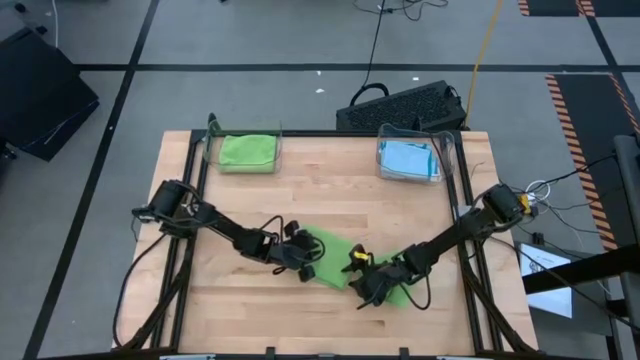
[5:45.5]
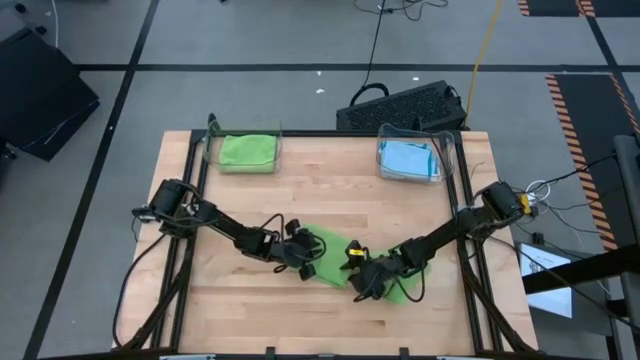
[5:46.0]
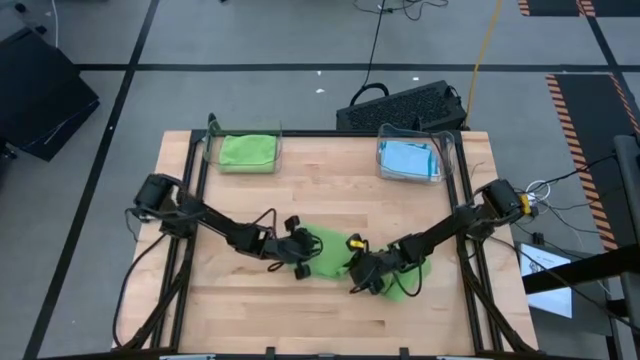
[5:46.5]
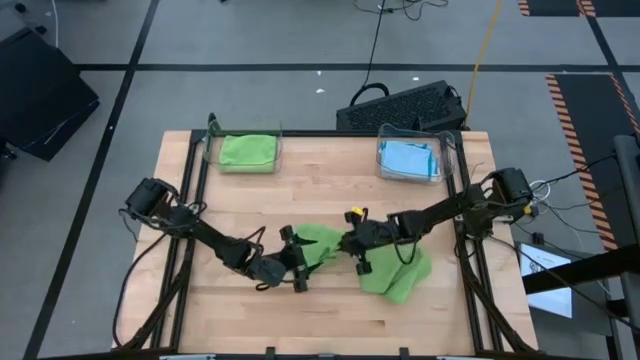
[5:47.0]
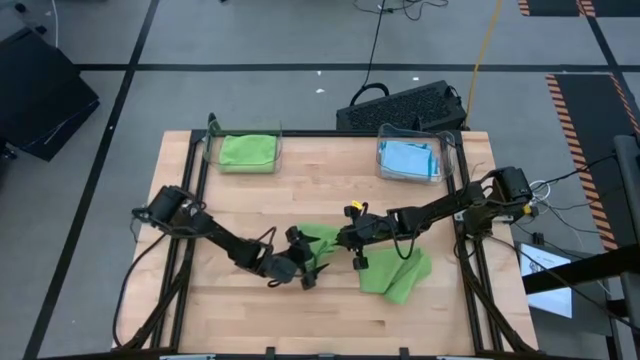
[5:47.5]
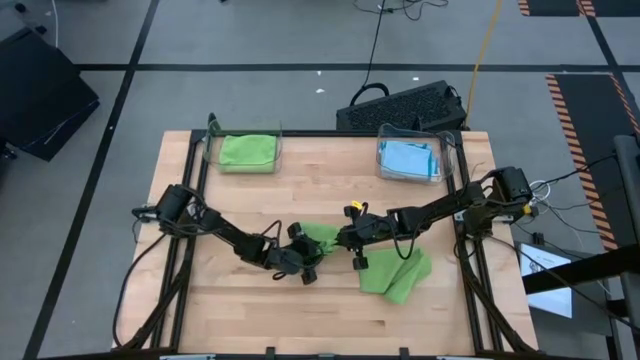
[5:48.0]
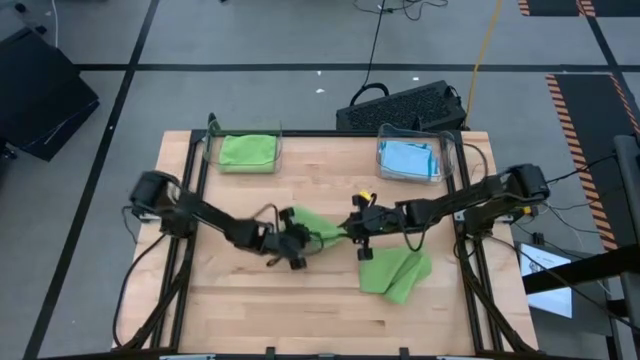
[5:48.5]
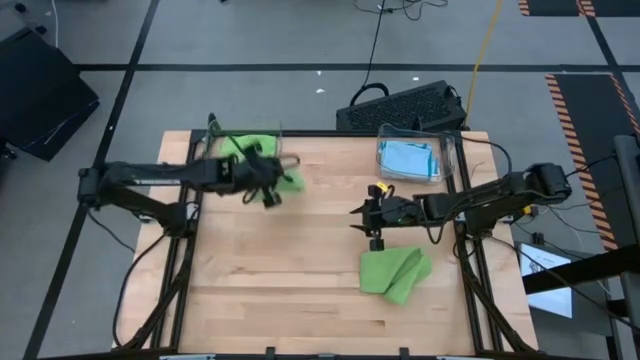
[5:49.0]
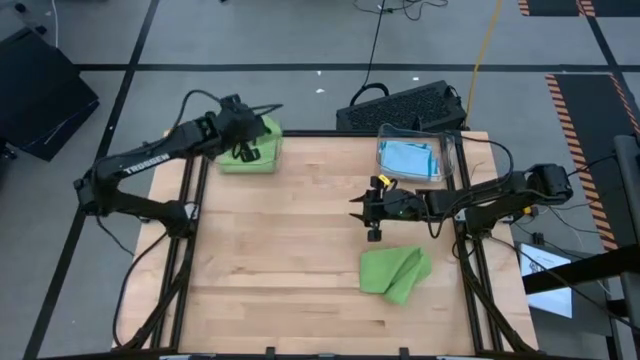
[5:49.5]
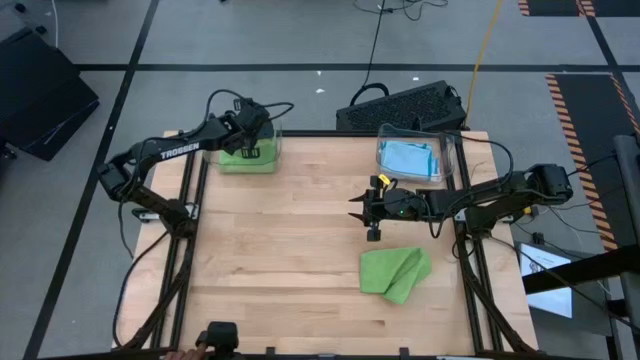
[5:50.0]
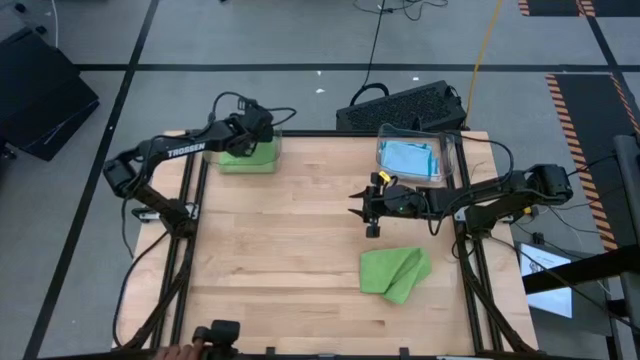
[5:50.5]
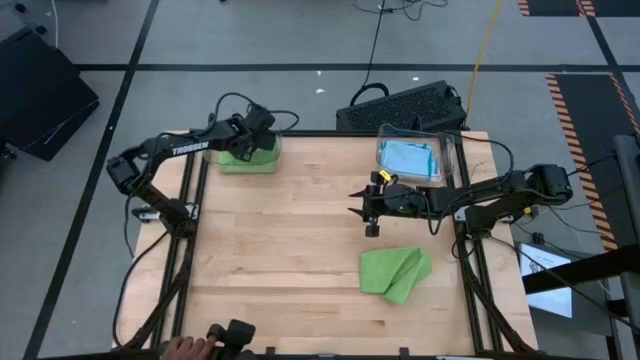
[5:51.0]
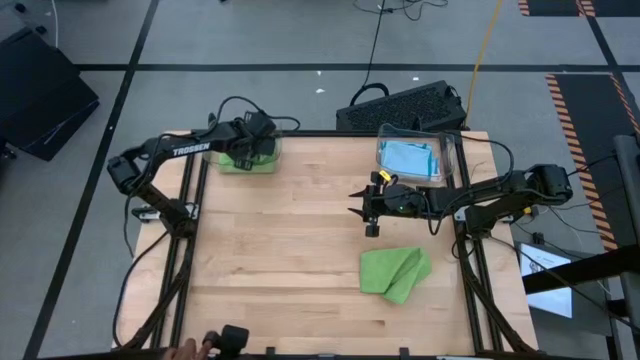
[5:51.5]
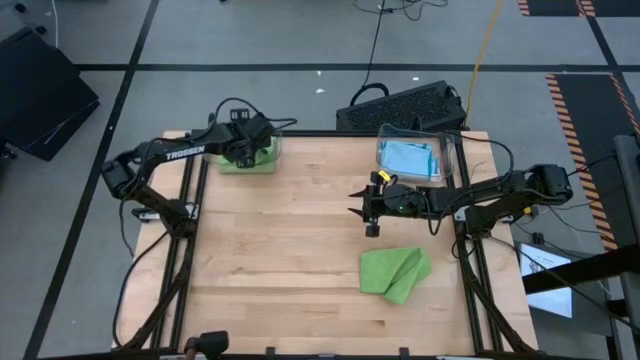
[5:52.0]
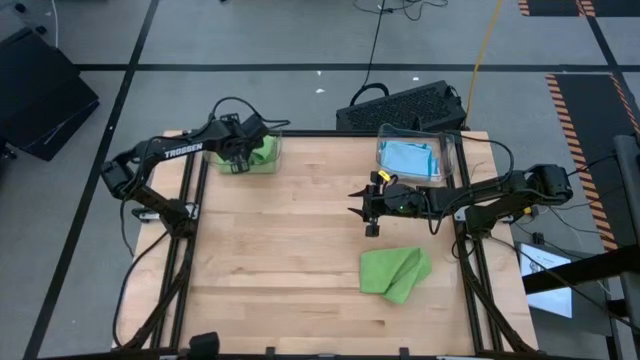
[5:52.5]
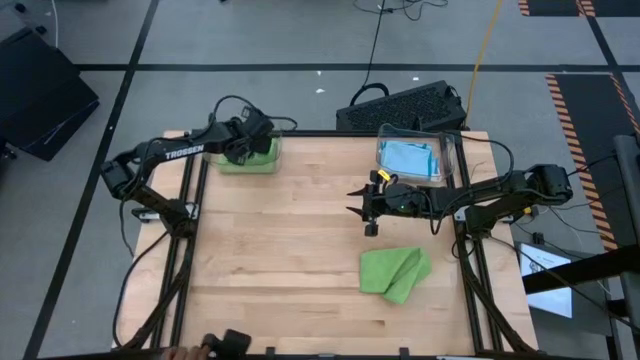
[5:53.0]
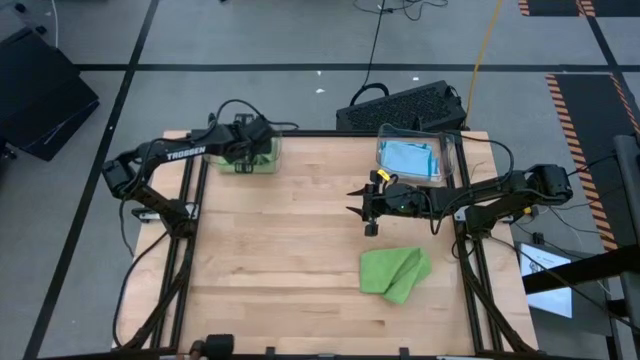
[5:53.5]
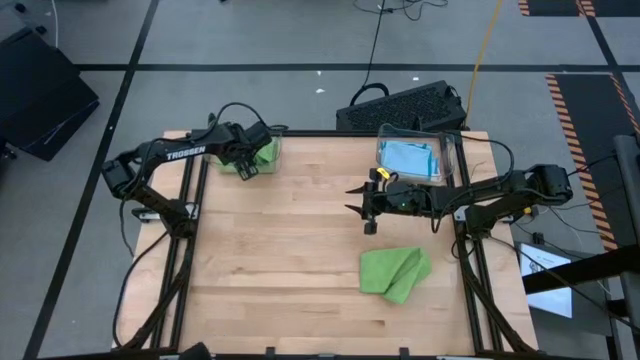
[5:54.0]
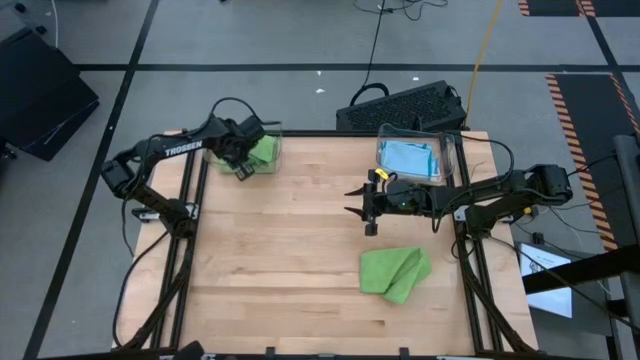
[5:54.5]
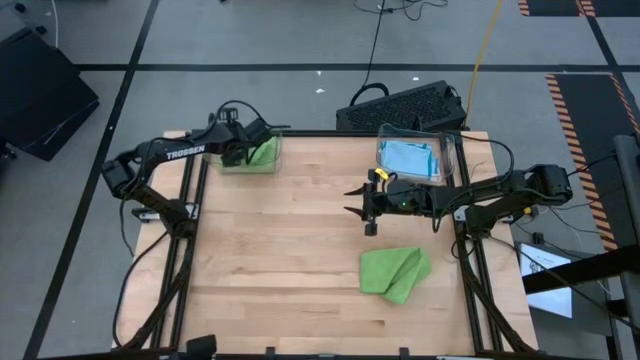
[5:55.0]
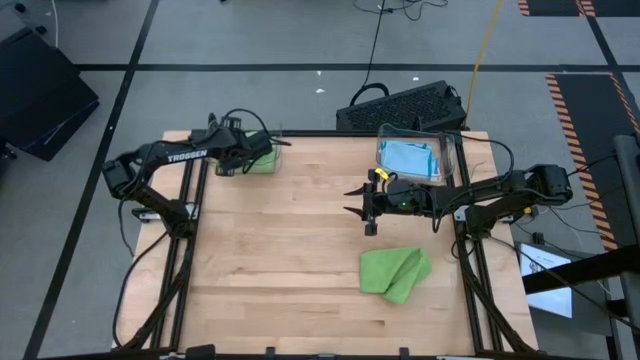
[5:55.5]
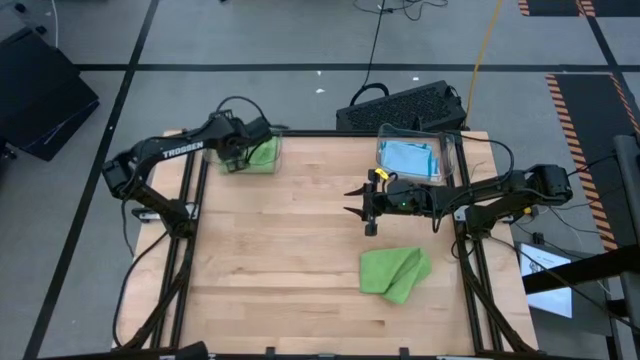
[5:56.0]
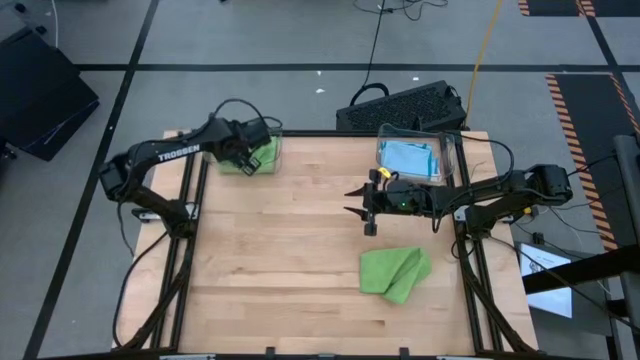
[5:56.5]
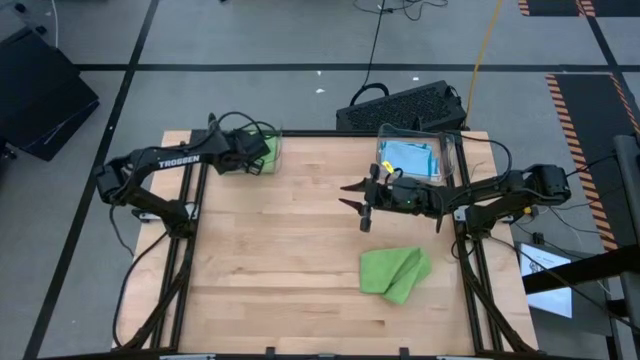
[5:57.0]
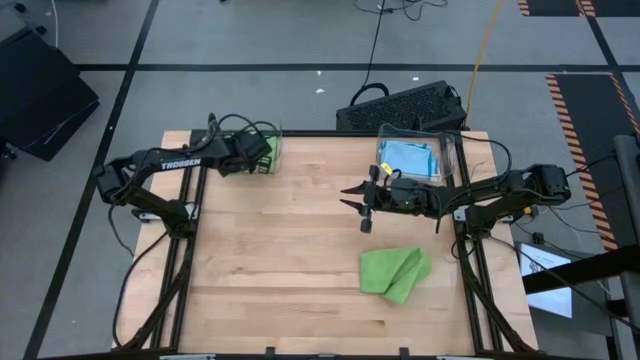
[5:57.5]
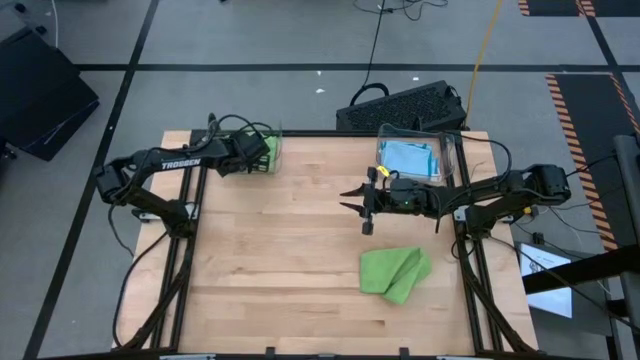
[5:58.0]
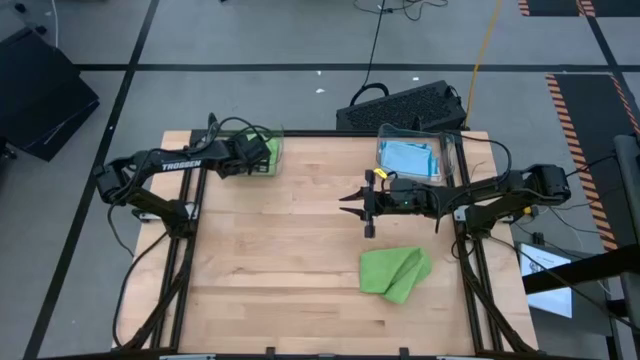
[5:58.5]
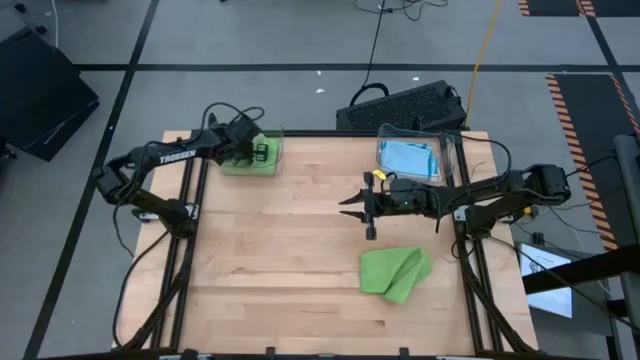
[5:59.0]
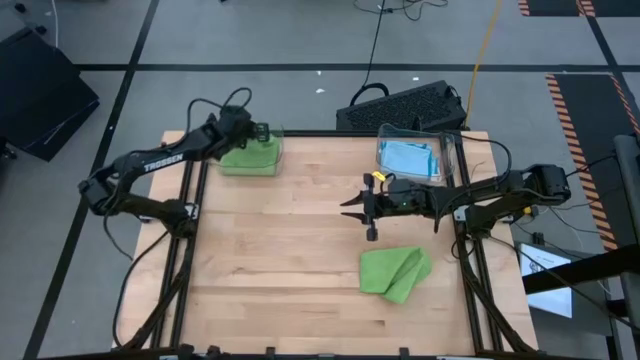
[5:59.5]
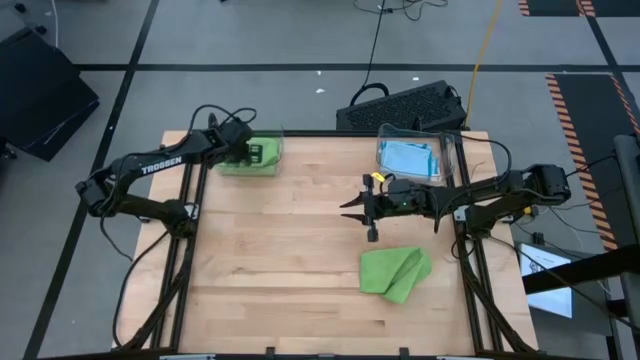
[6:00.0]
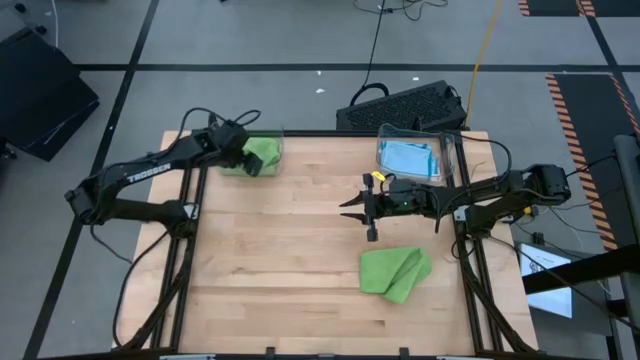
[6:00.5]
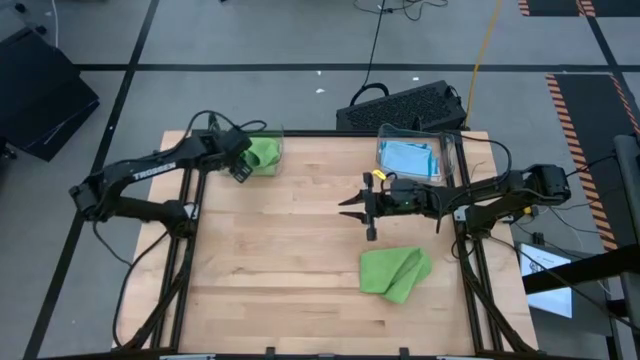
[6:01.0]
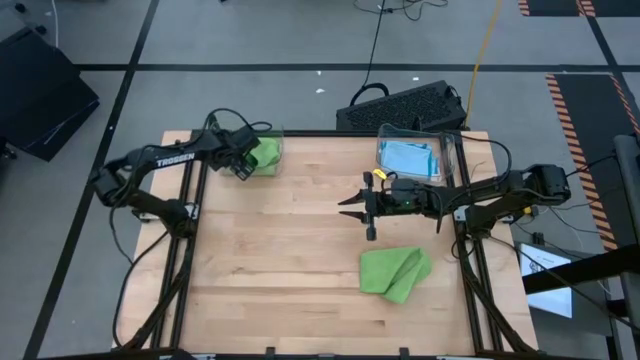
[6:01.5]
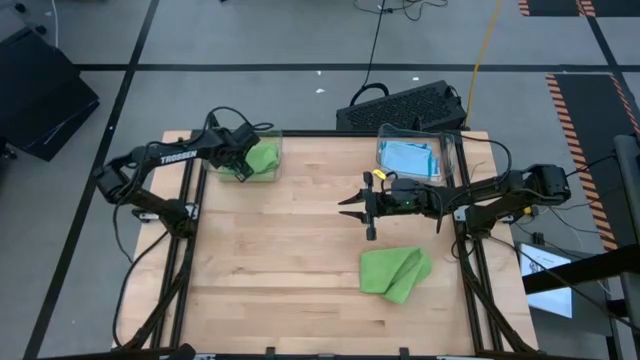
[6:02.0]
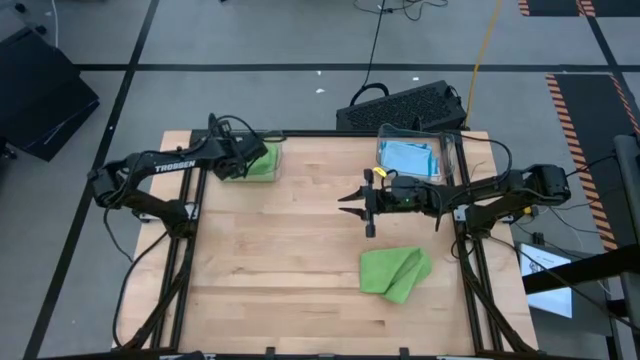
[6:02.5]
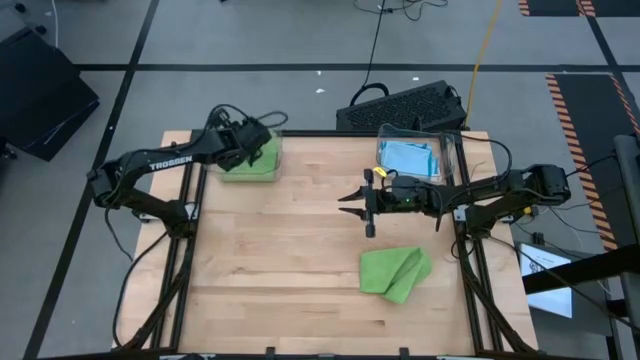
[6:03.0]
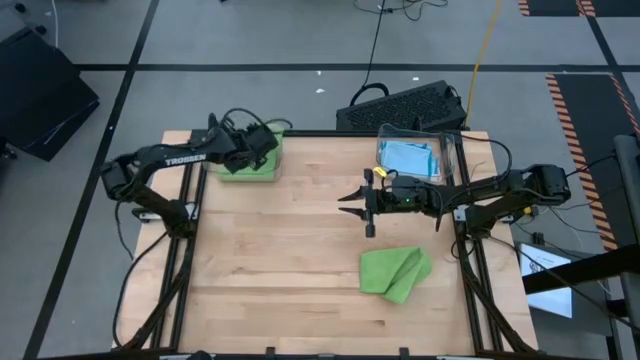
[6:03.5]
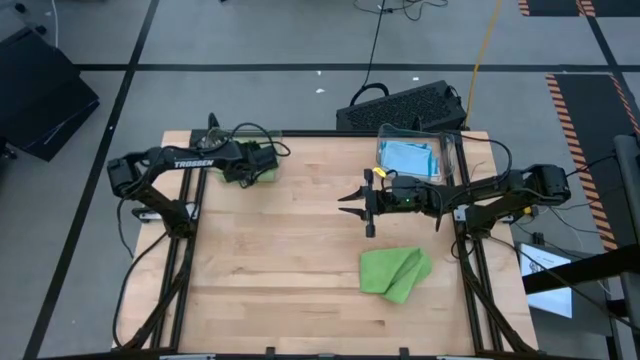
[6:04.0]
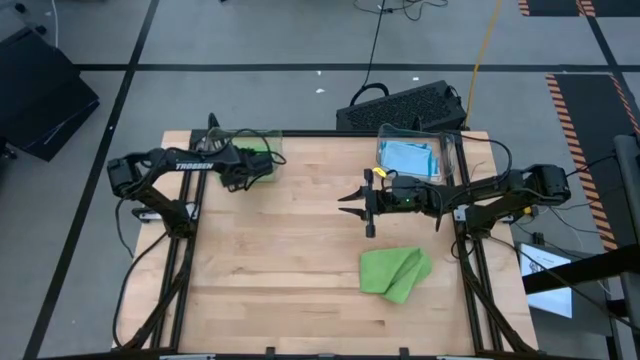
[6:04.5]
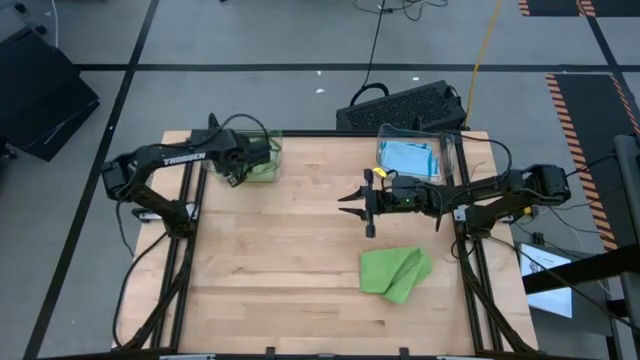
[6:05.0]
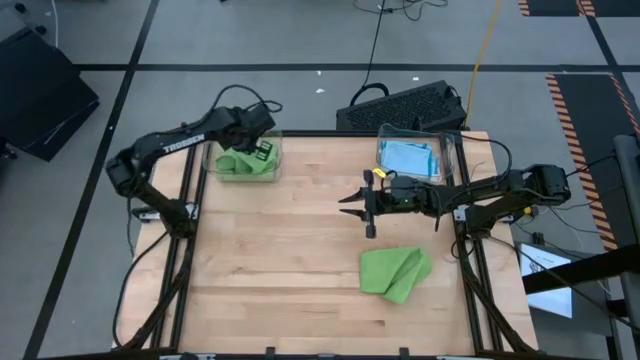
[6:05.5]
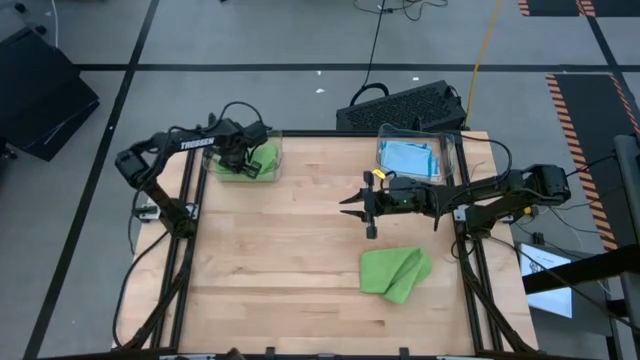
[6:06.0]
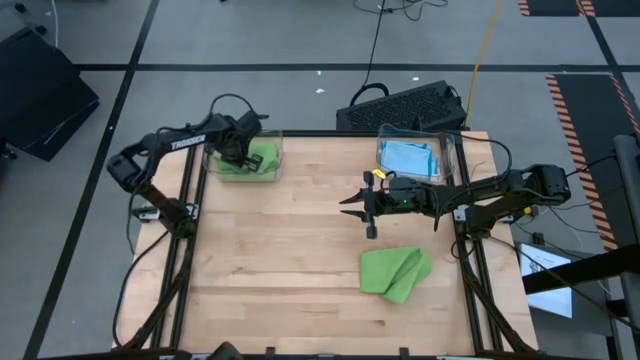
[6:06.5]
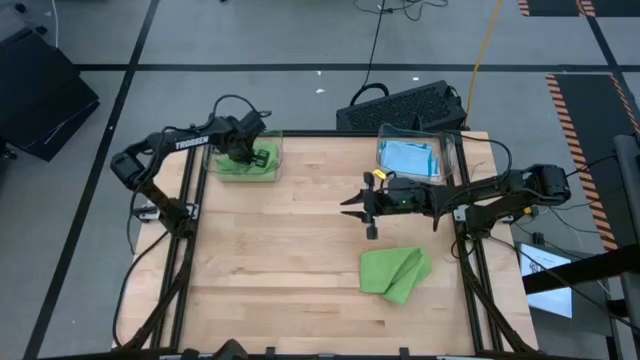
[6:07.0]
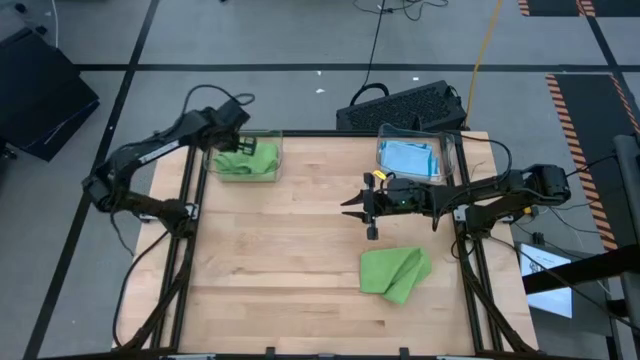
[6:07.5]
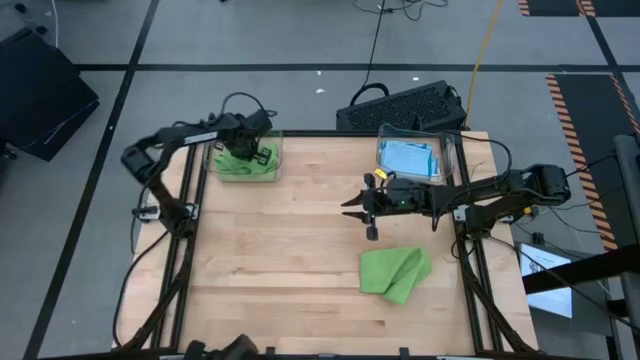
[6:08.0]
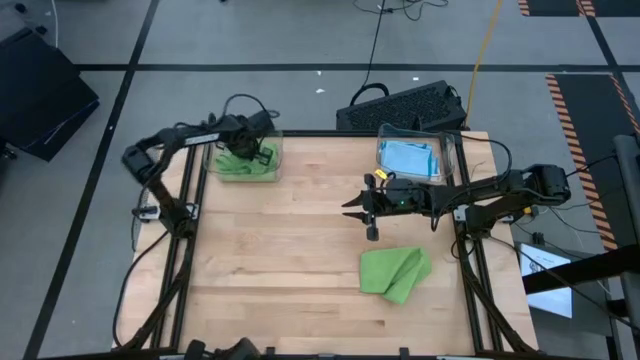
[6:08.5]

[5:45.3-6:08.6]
Task: Fold microfiber towels
Put the folded green microfiber cloth into the left transparent bin
